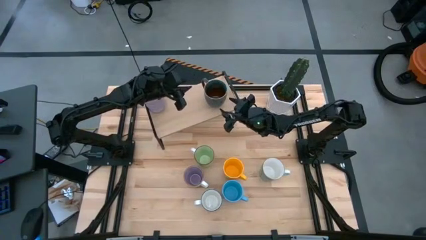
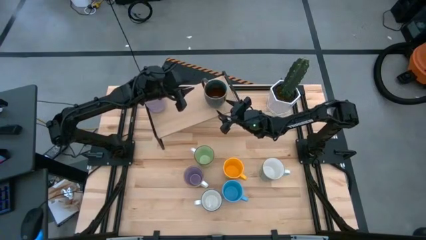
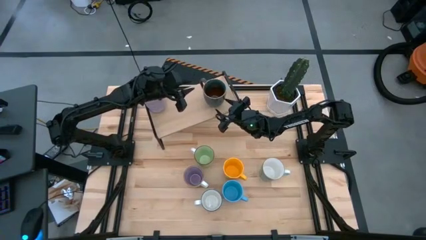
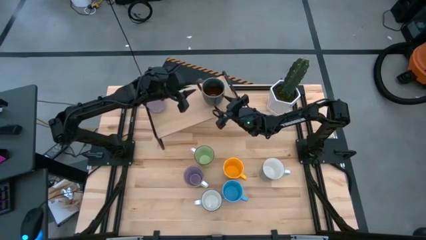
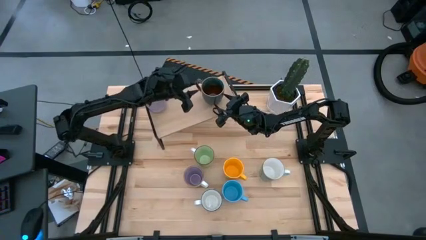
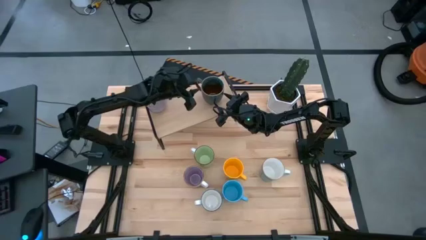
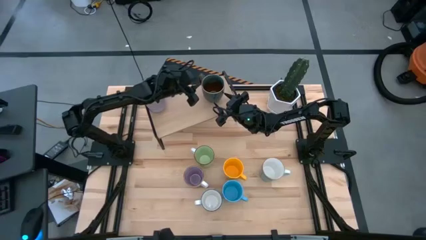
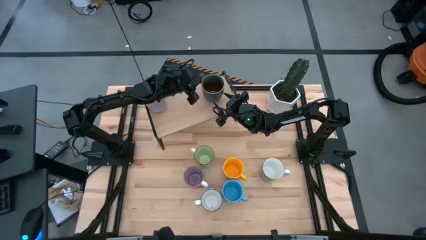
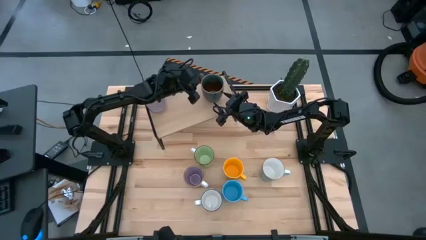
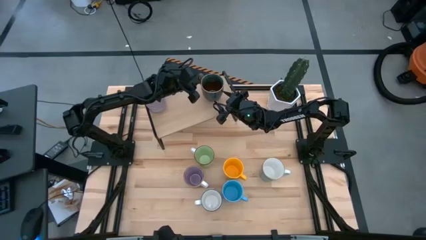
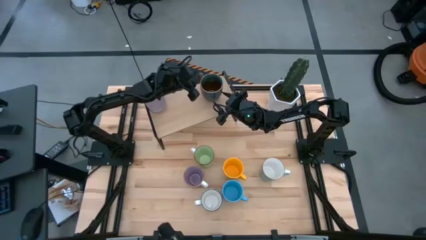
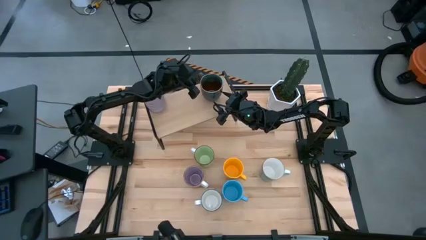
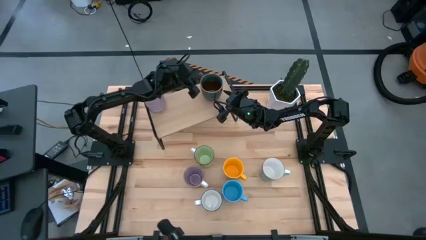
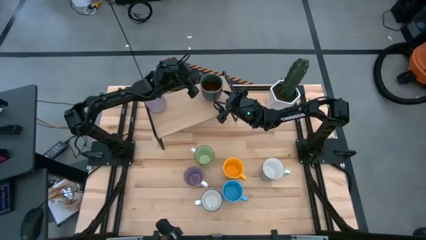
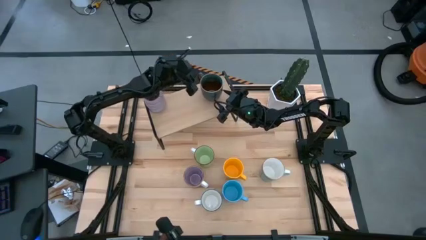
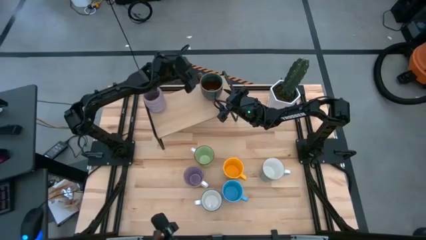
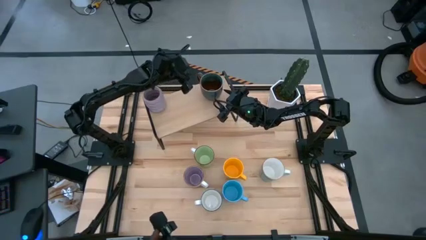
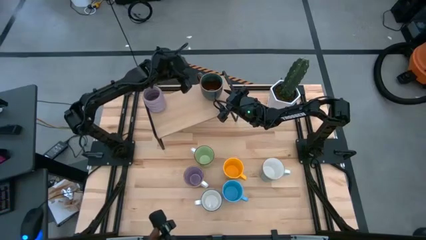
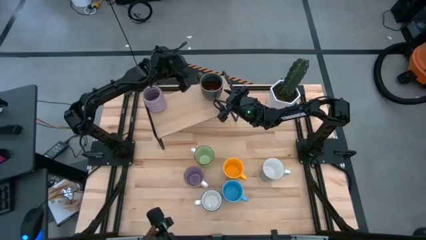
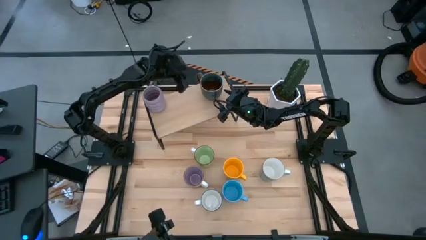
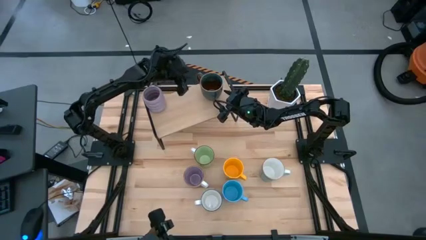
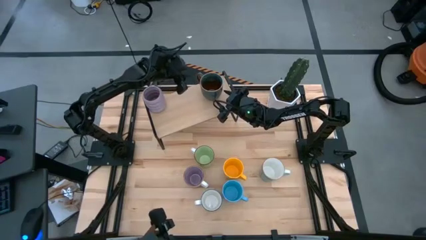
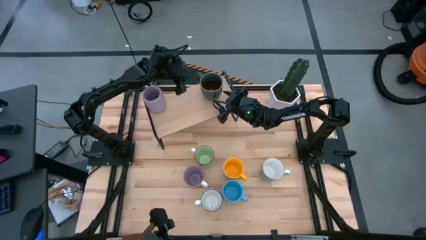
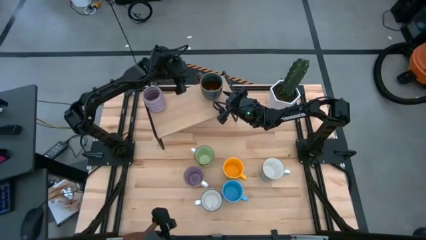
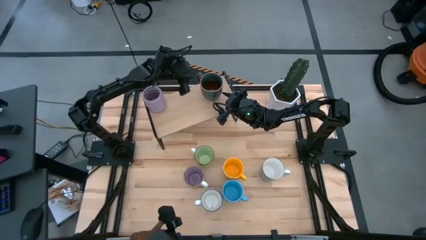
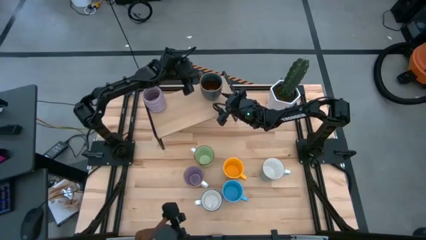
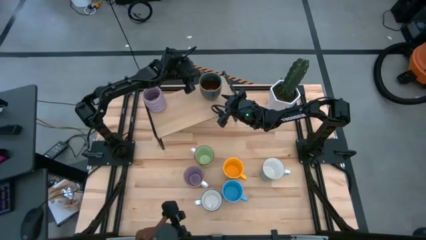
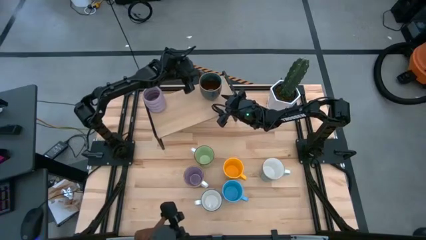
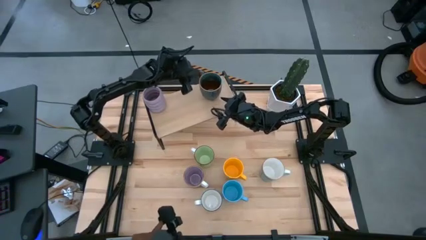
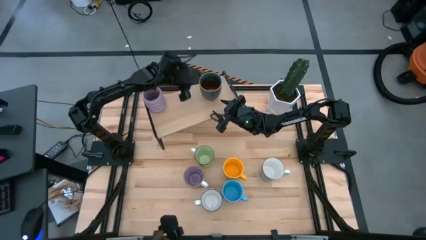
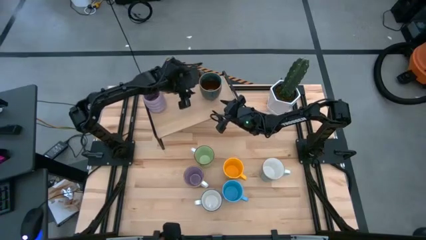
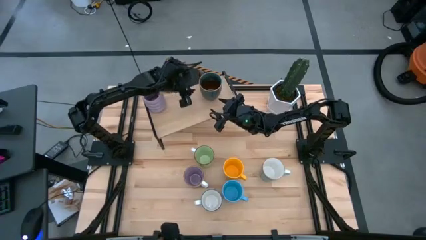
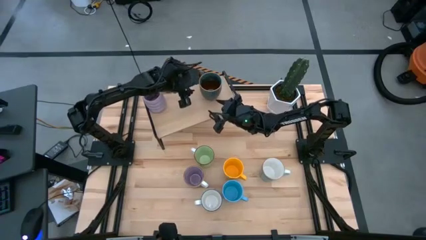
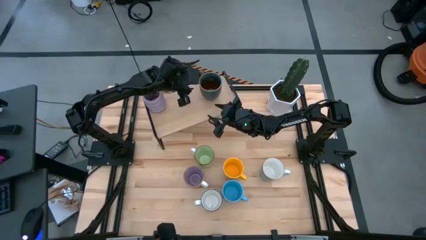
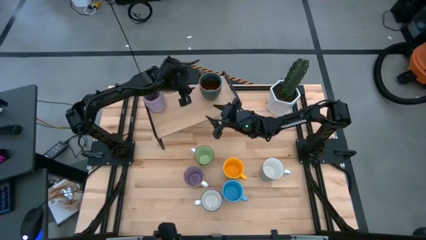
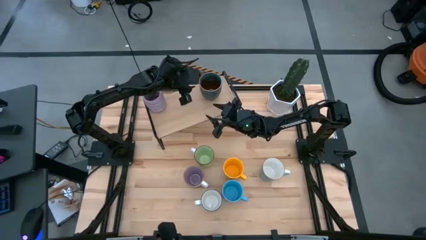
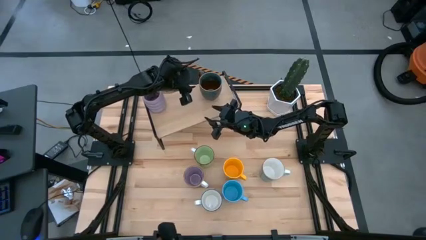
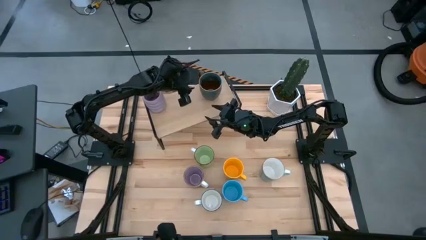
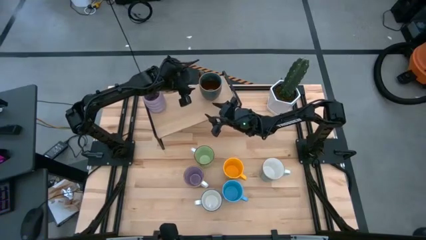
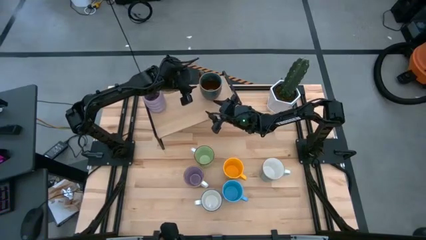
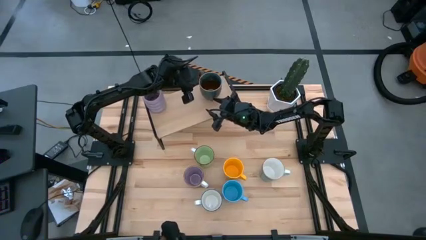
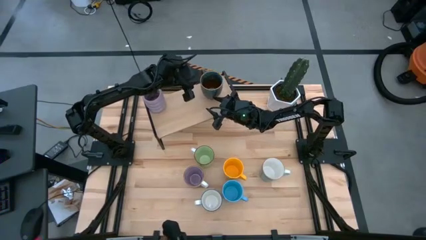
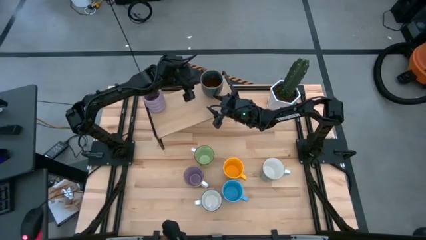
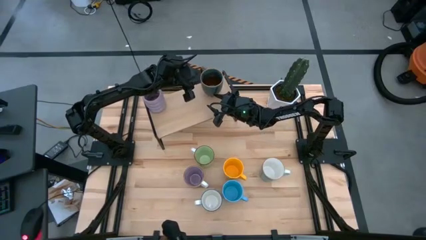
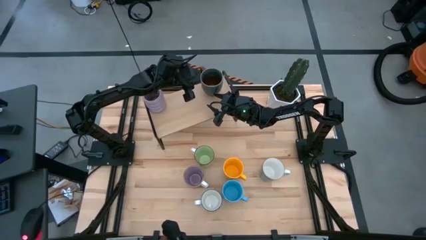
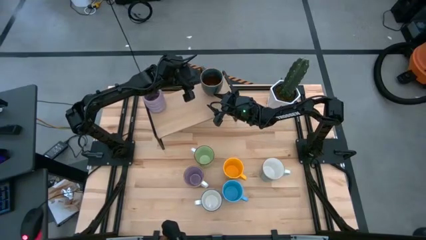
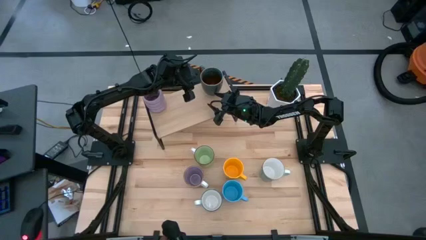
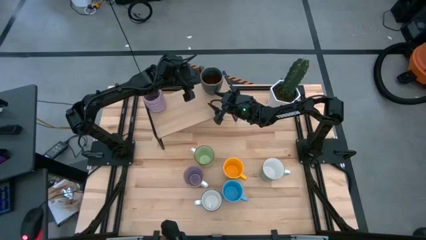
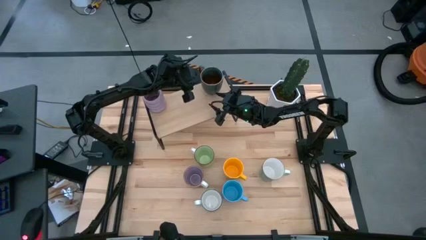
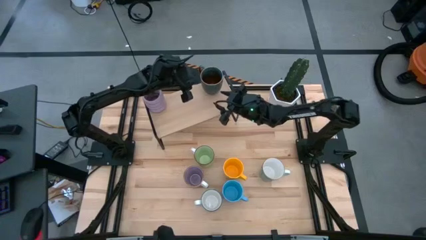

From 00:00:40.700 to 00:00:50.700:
Task: Place coffee mugs
Put the green-brown patterned mug on the shelf

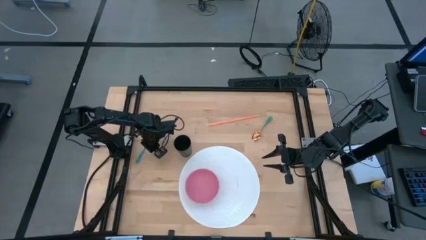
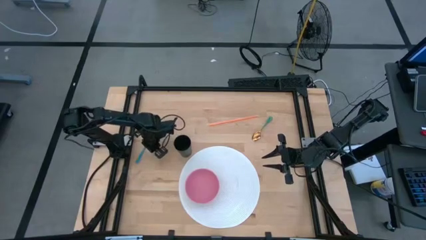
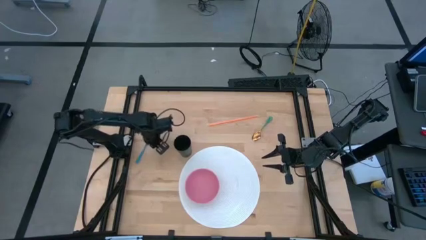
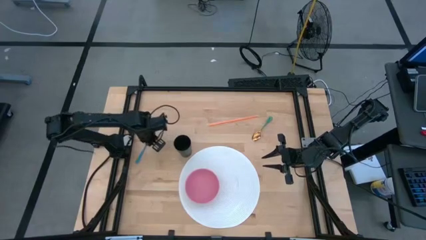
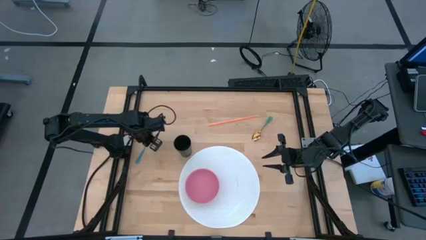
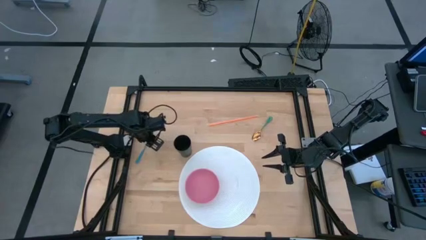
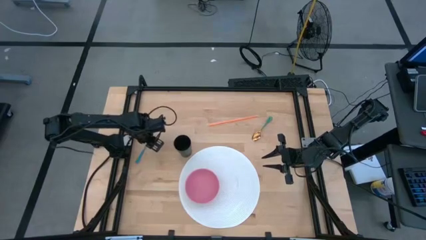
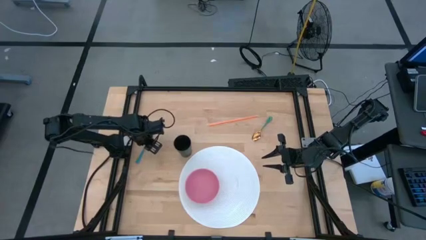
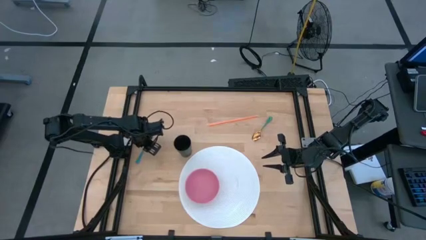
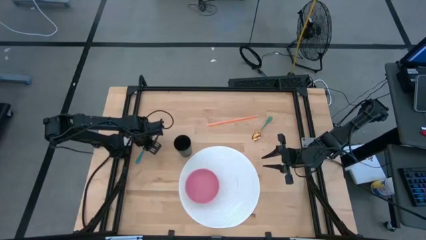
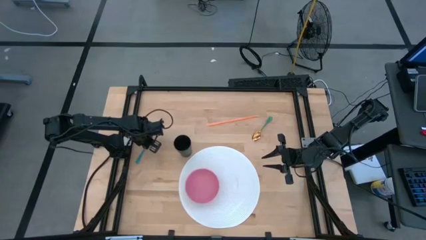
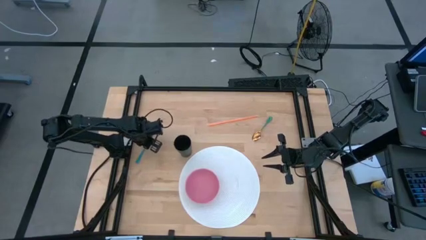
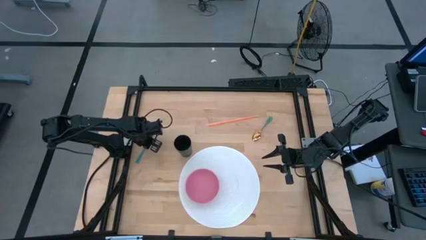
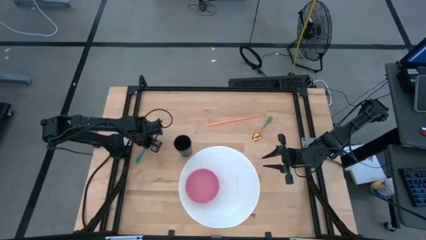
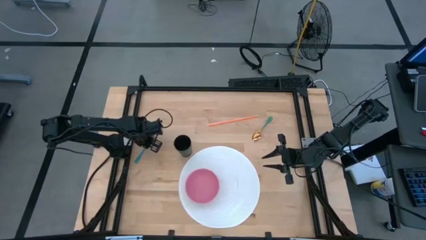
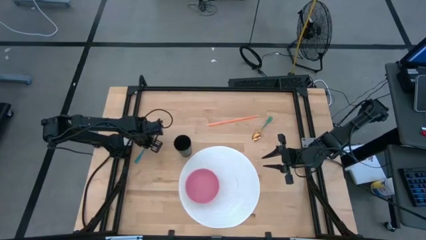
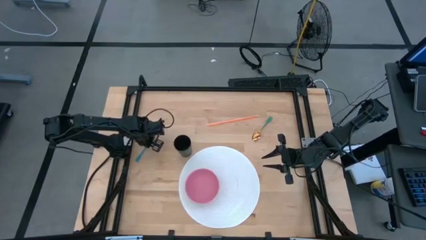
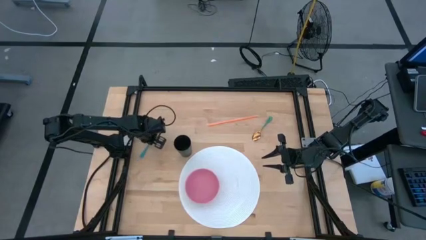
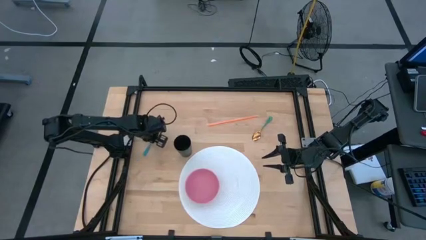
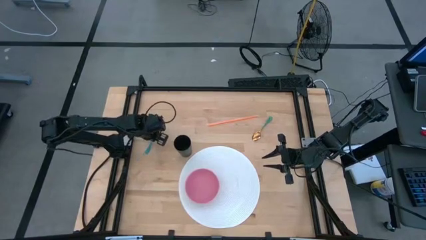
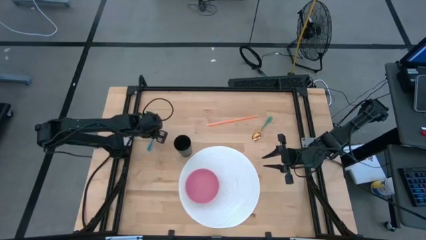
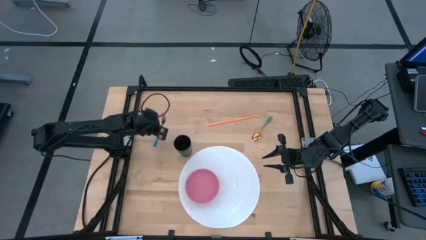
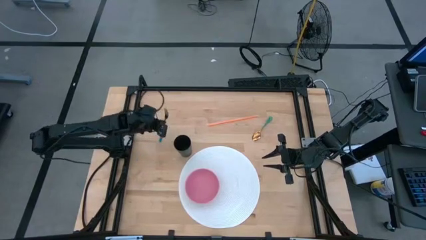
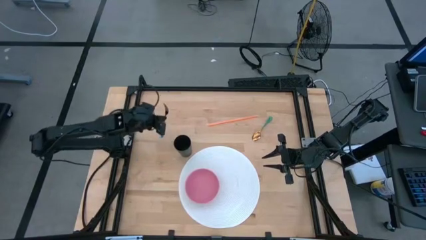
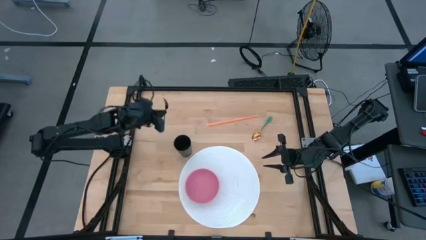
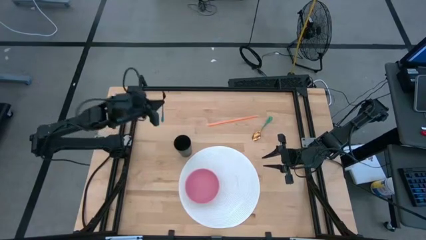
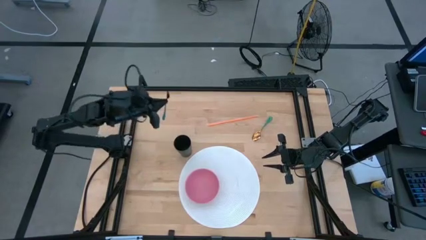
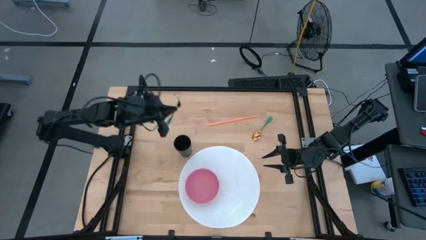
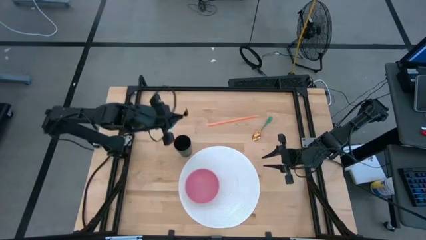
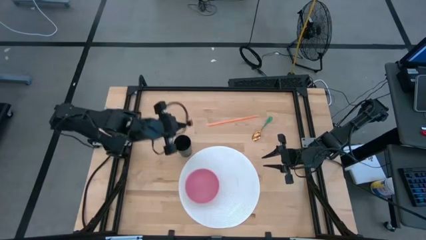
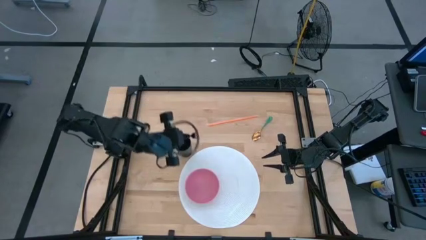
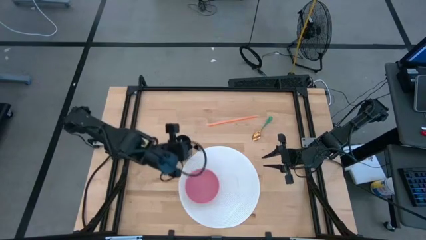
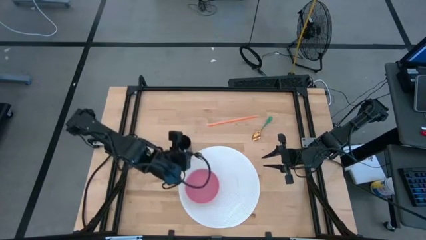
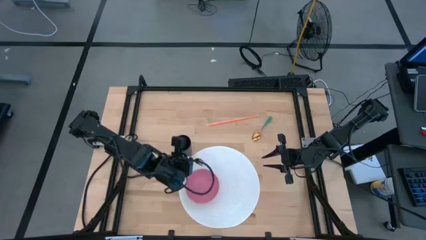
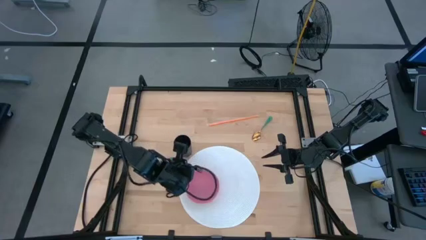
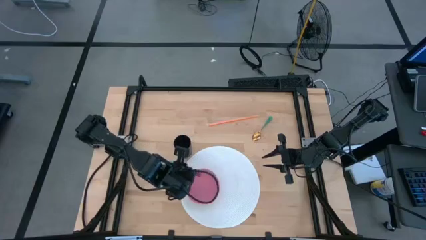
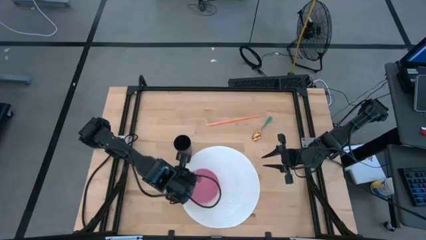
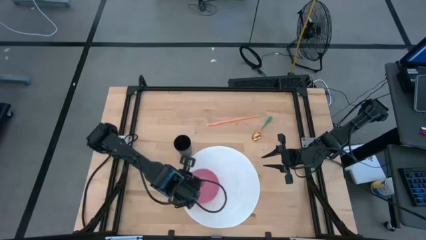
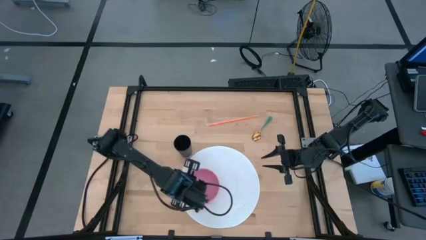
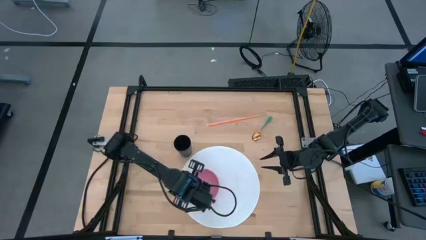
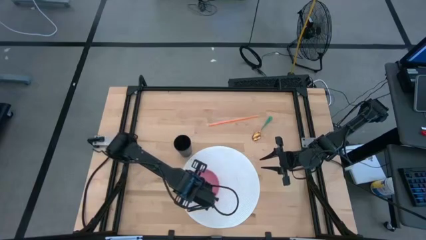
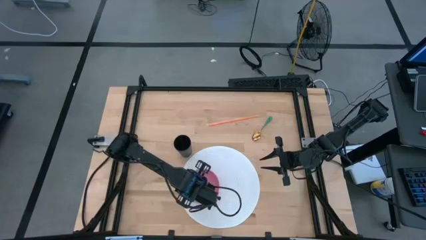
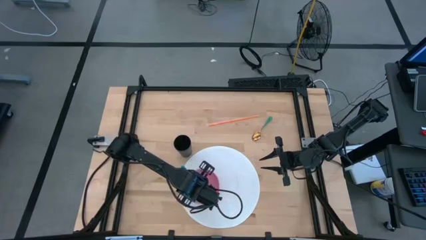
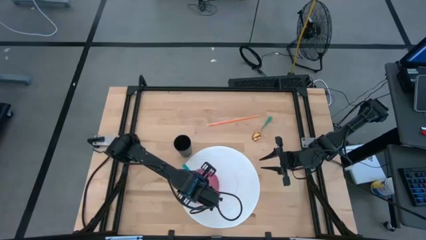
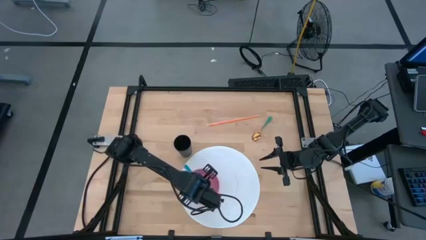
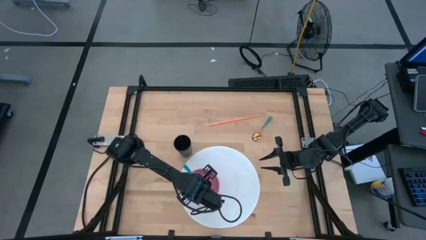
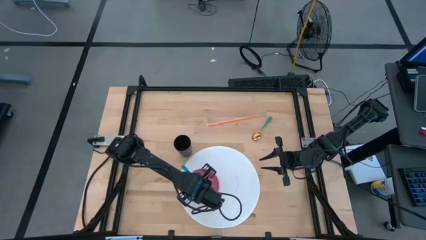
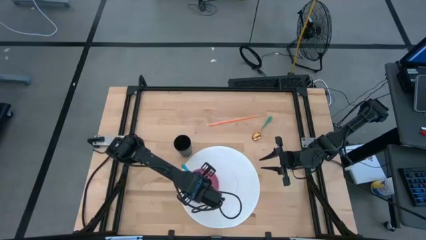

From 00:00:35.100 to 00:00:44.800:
Task: Pick & Place Utensil
Put the blue fork in the pink bowl
